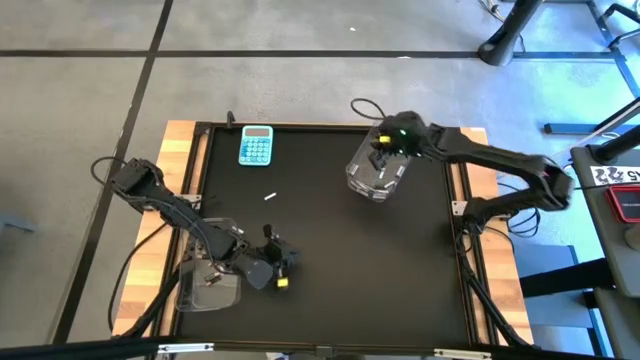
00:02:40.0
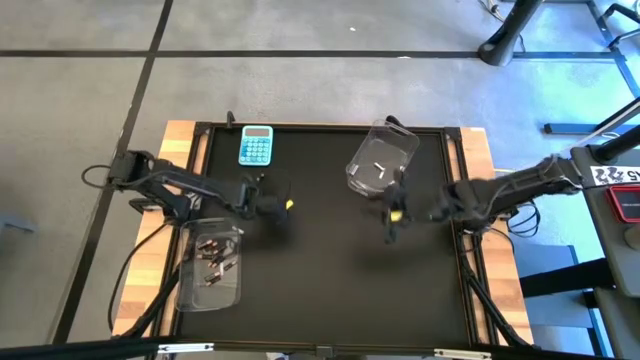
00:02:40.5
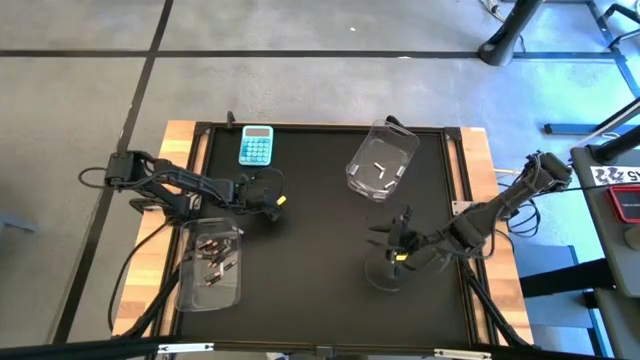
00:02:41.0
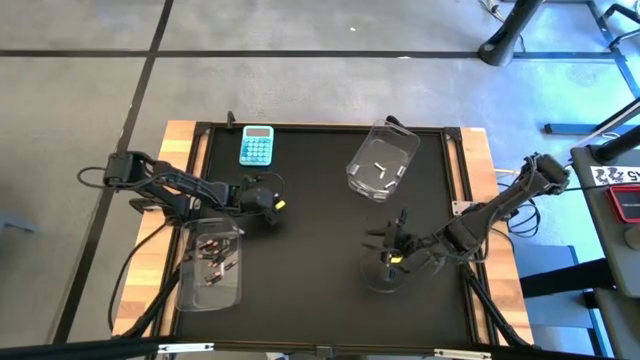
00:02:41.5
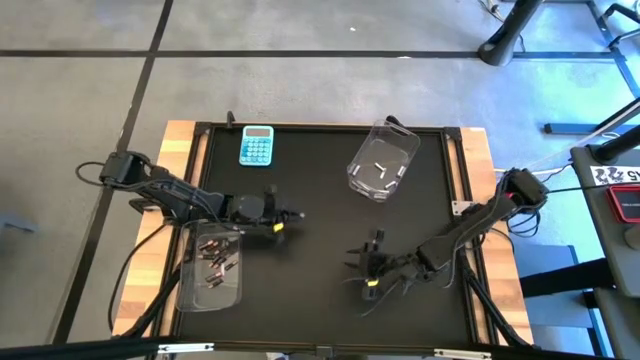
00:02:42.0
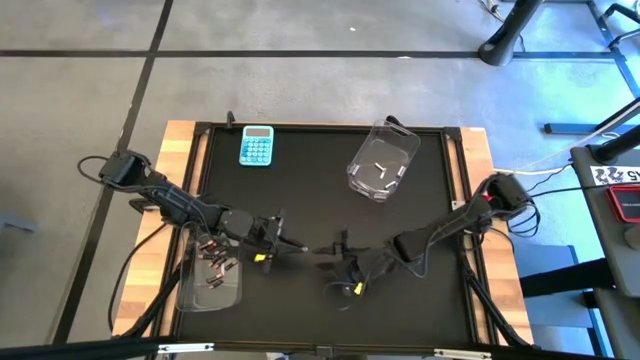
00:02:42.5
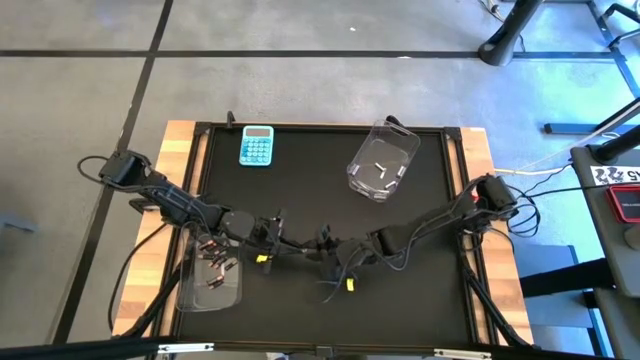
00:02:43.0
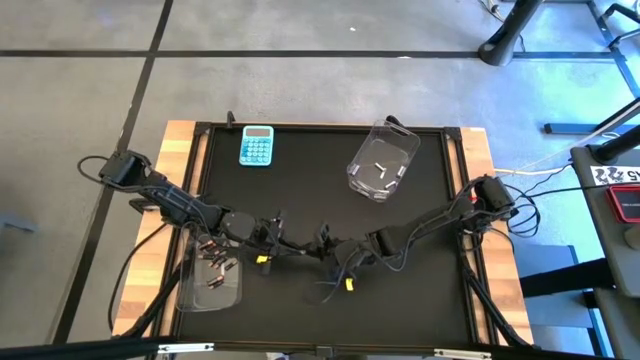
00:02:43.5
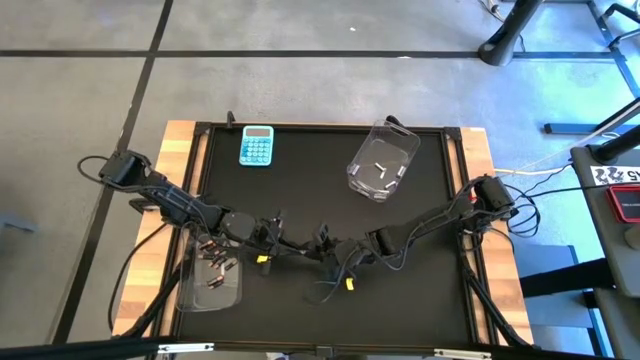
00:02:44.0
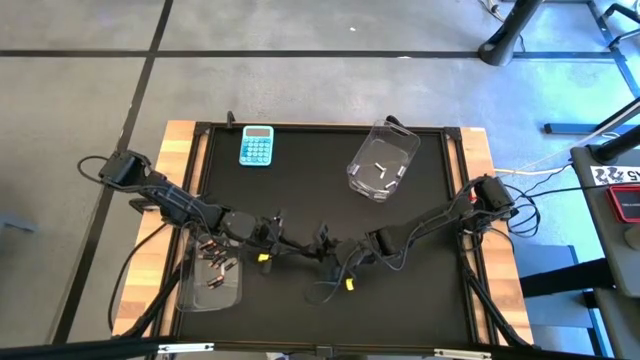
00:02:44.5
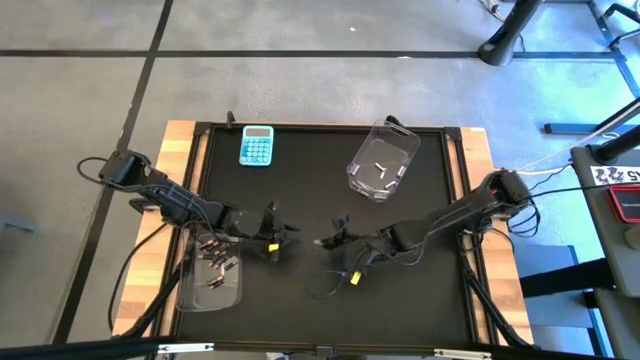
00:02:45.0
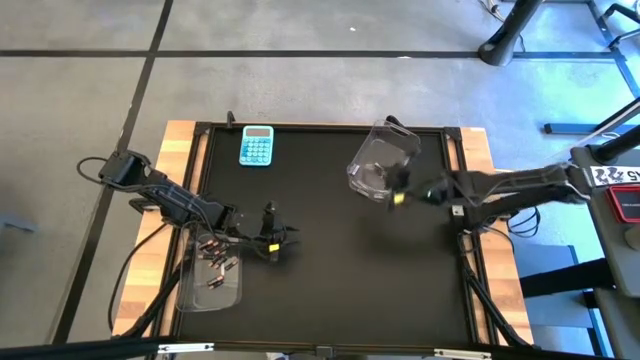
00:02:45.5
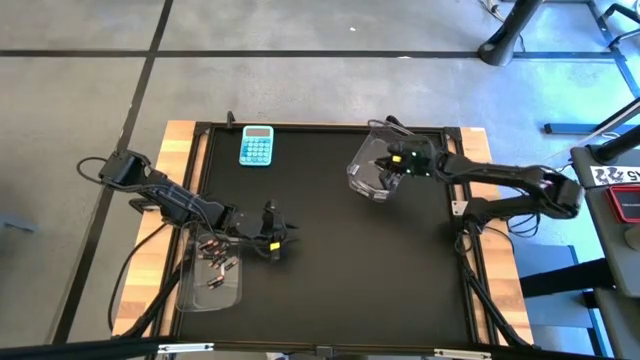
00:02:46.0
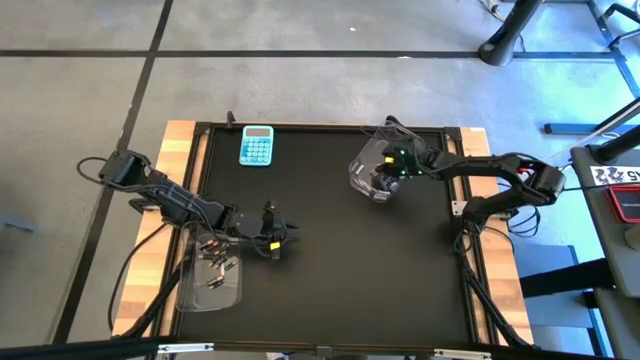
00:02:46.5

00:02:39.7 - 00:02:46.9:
Task: Sort batteries
Put the white battery into the top transparent bin

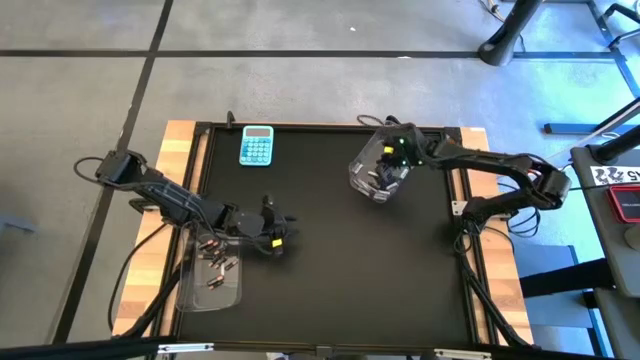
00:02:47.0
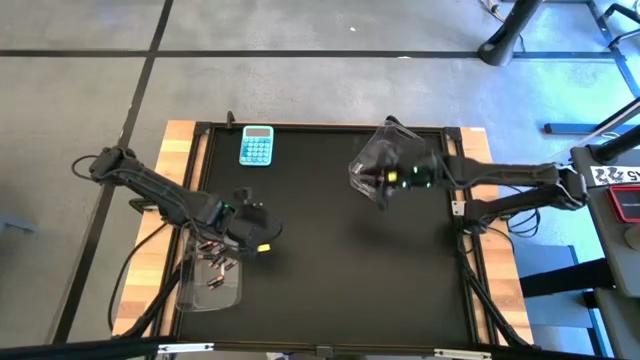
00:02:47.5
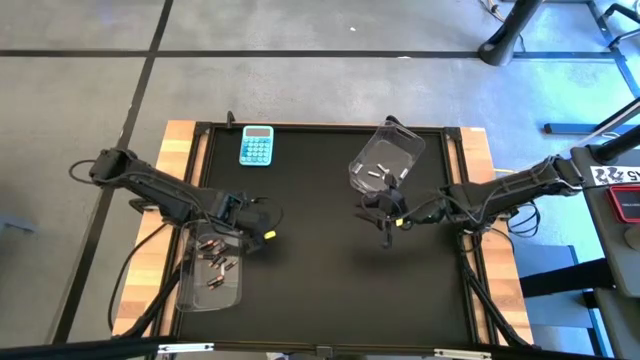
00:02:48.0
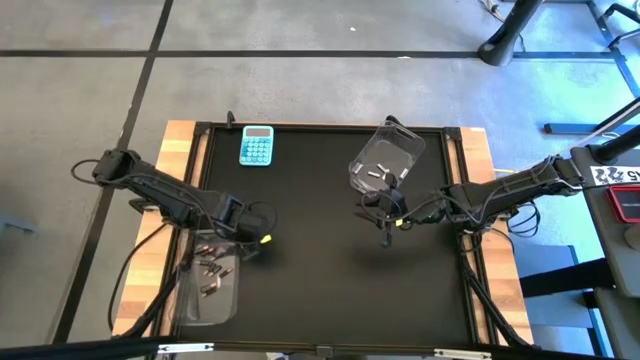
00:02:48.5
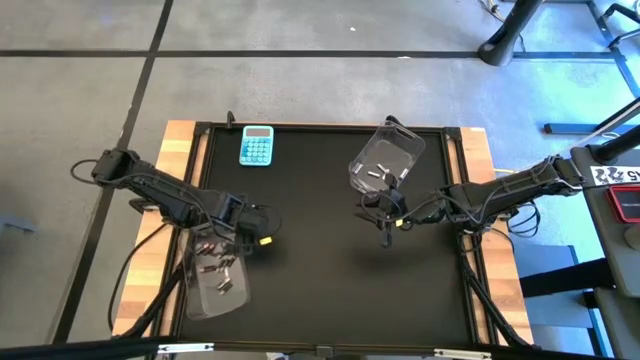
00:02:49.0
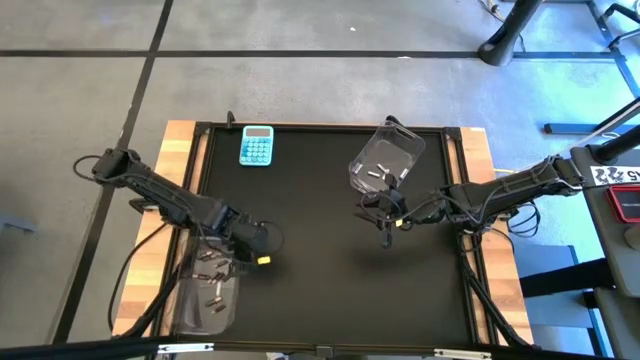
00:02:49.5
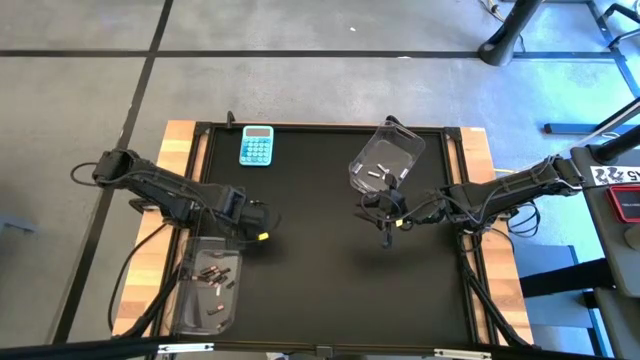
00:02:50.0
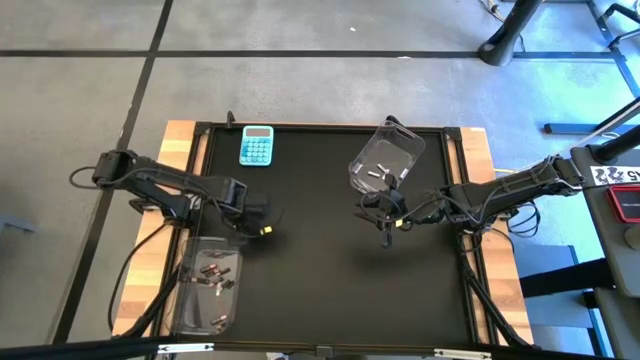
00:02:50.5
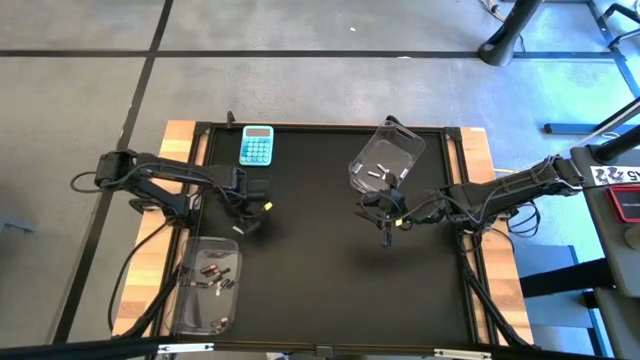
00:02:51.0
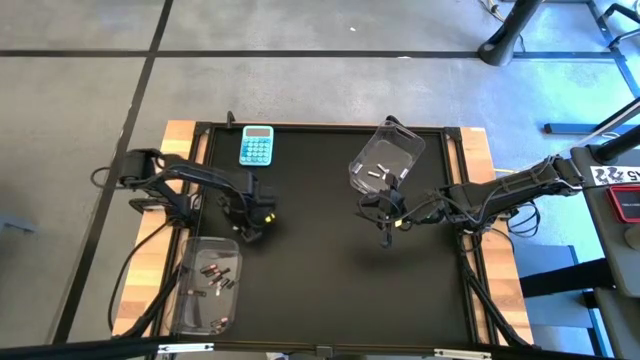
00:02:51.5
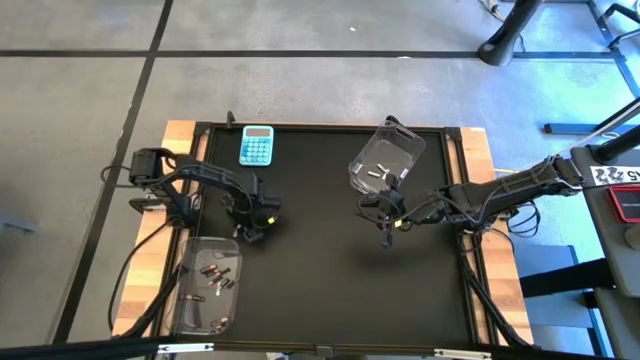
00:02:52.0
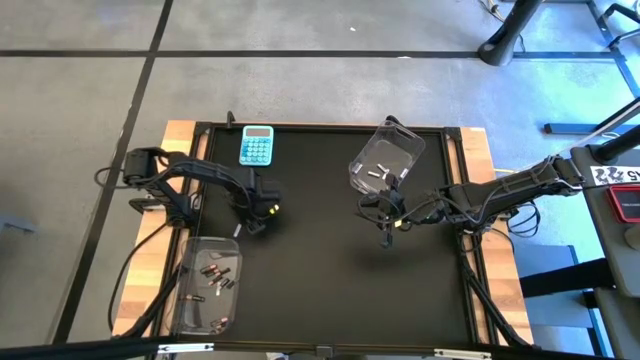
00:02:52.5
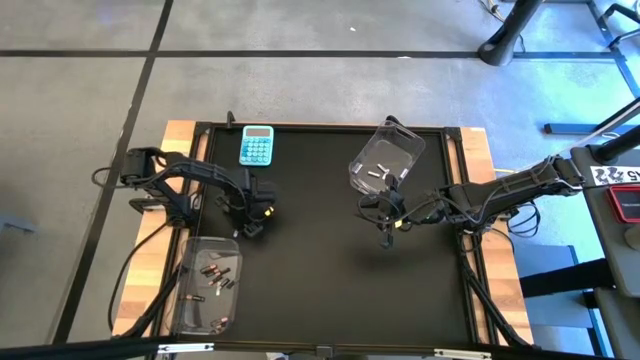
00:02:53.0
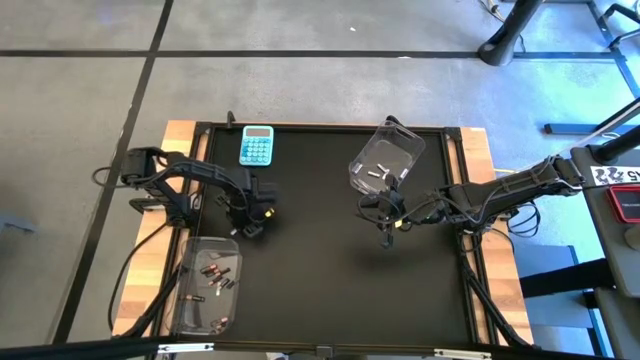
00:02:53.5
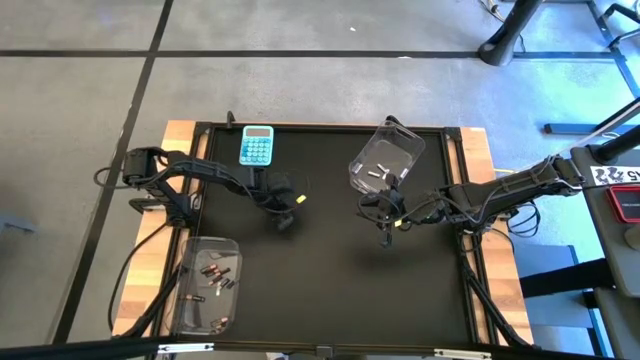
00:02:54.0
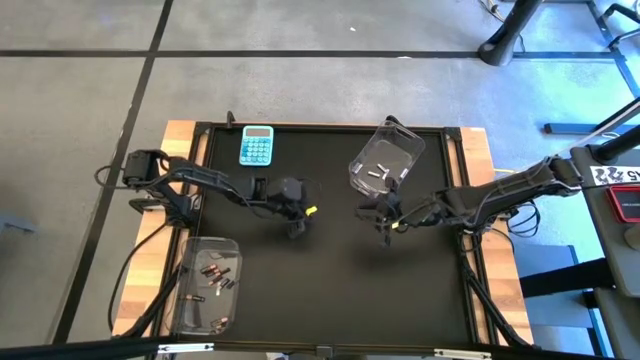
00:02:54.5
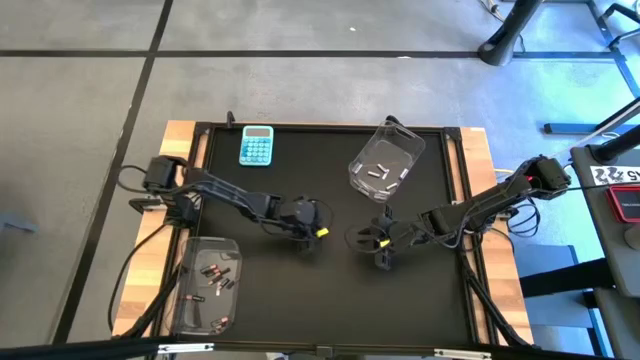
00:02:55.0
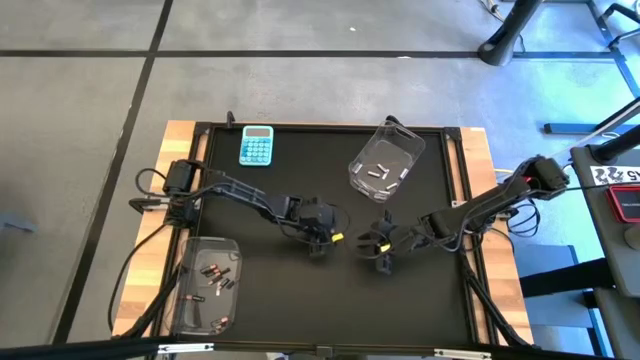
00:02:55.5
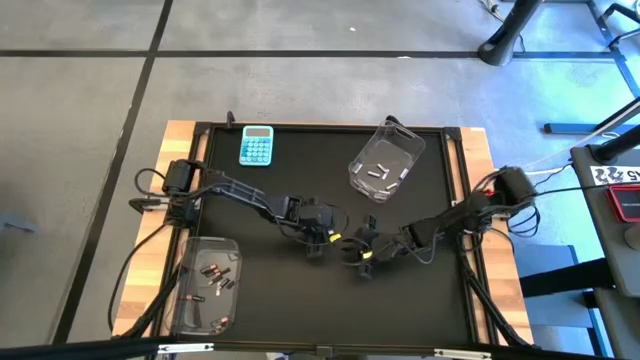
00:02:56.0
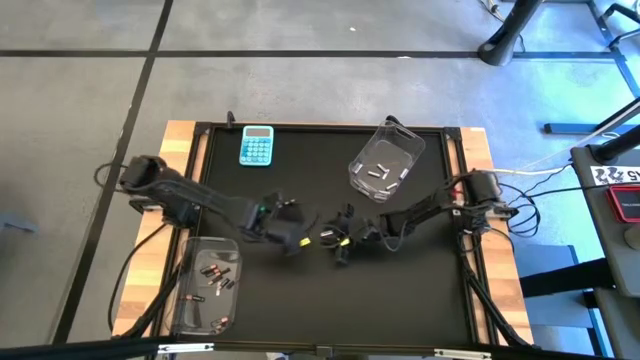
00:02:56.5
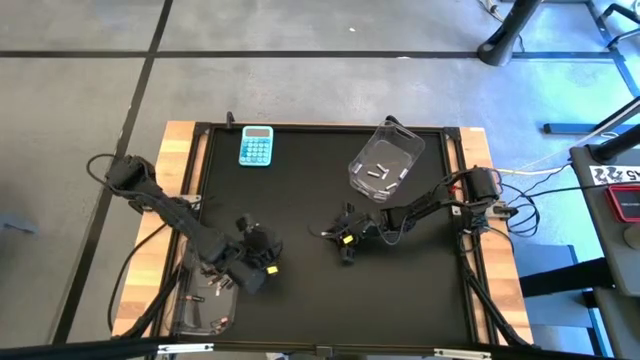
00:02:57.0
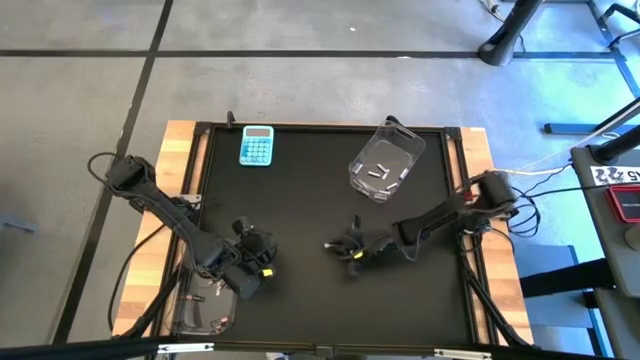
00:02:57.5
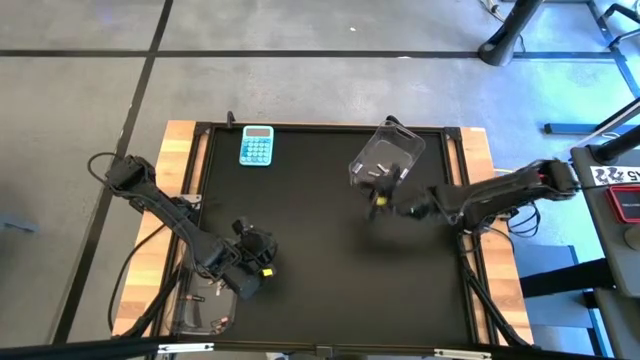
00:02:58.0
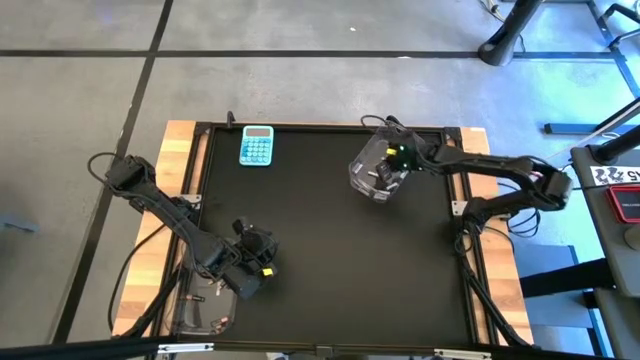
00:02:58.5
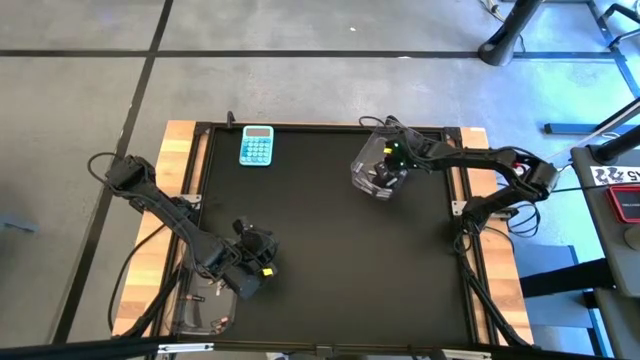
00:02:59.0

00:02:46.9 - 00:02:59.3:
Put the white battery into the top transparent bin

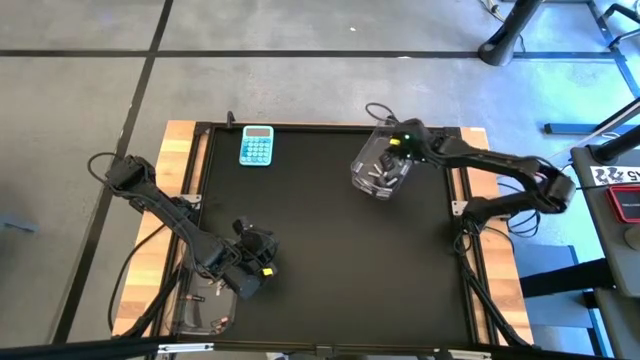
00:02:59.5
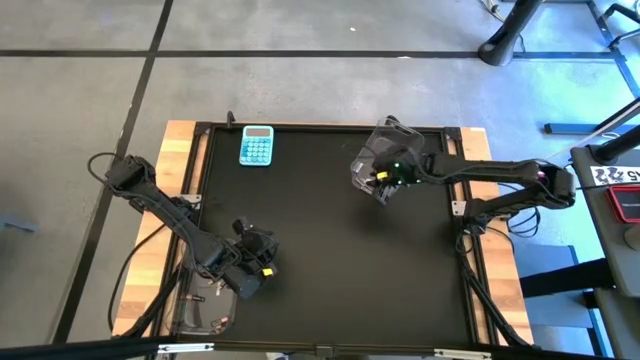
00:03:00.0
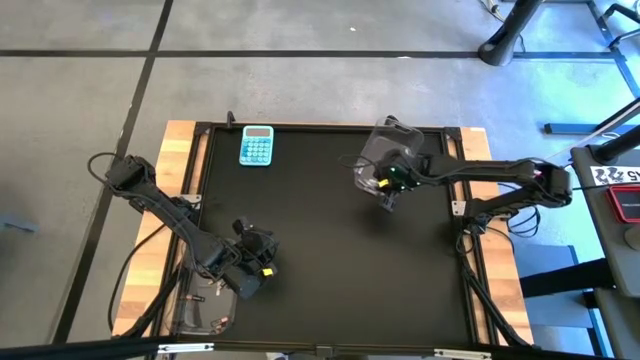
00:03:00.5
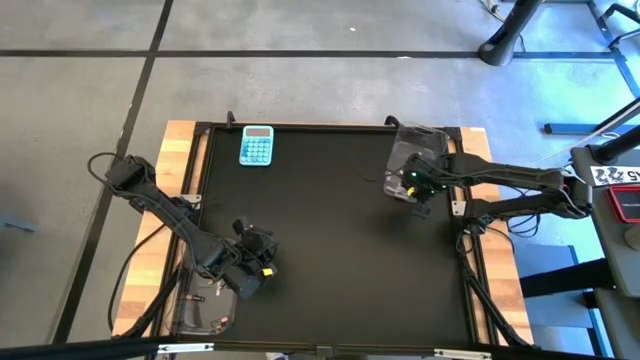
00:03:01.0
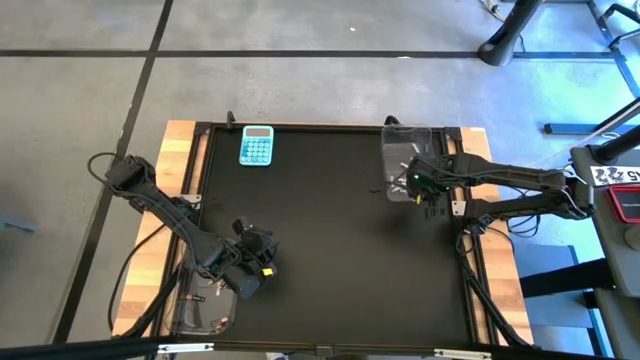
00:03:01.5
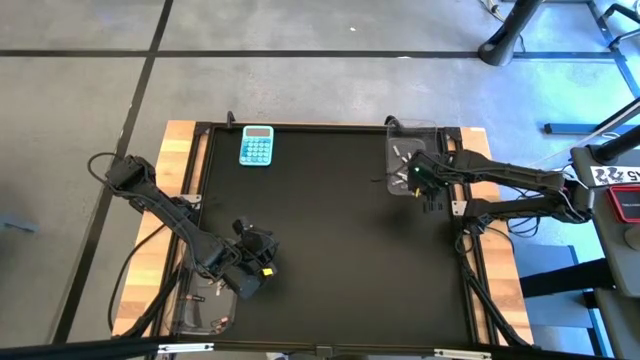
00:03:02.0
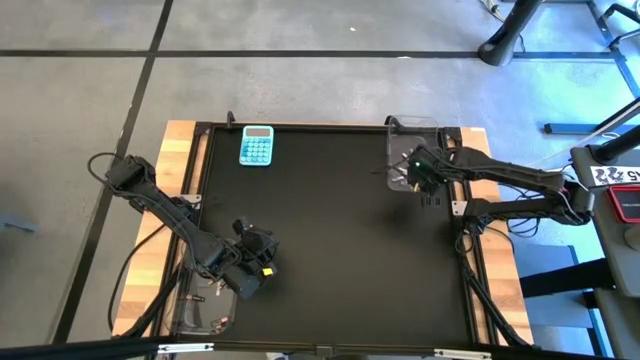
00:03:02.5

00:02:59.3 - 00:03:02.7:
Move the top transparent bin to the top right of the table
